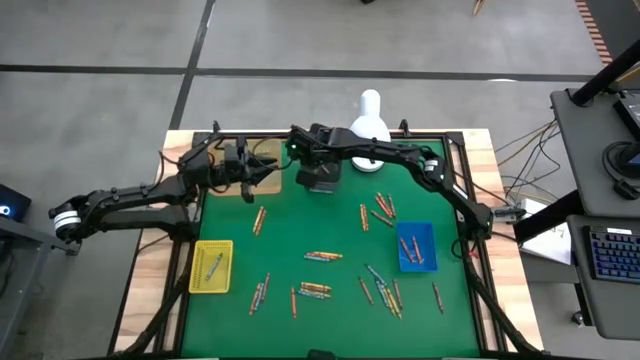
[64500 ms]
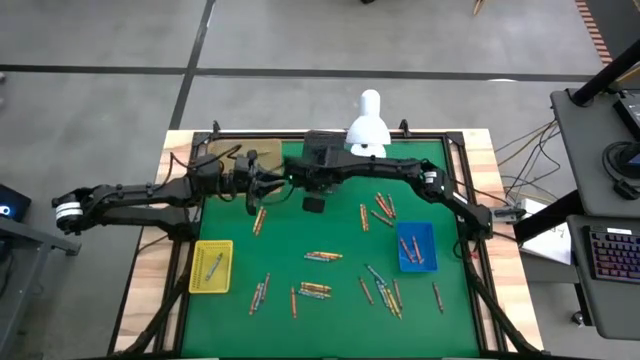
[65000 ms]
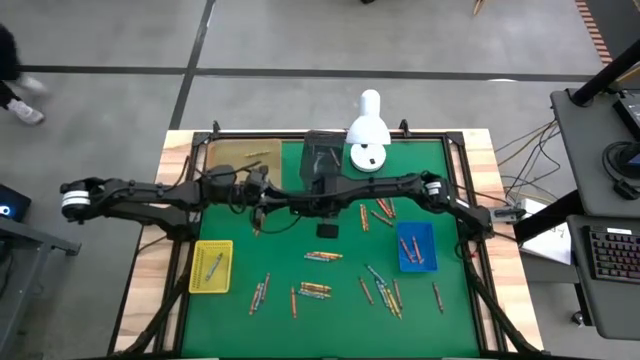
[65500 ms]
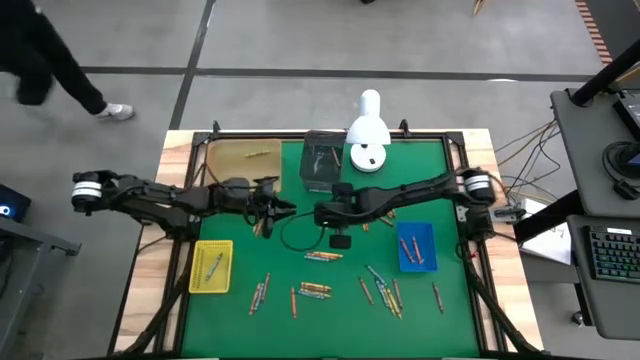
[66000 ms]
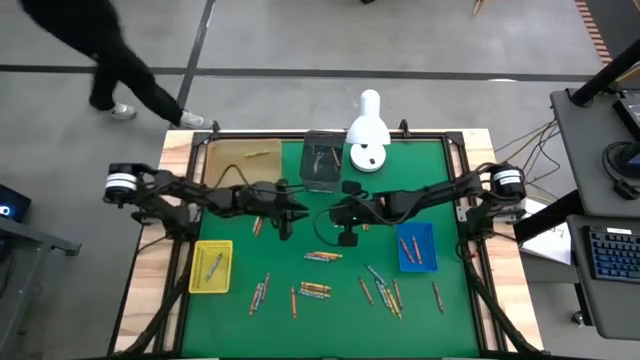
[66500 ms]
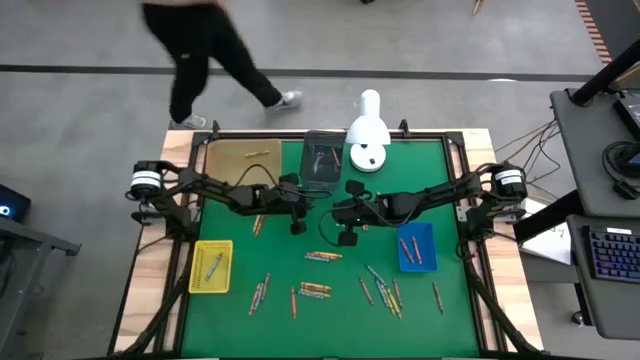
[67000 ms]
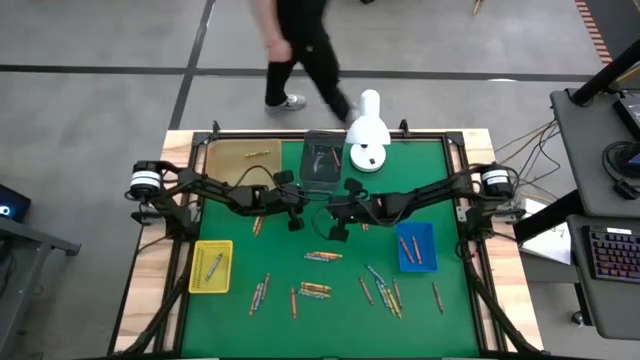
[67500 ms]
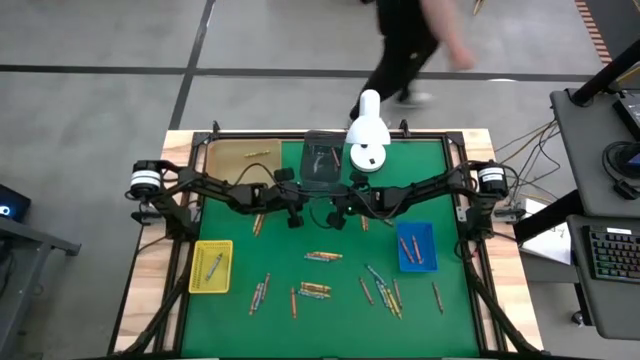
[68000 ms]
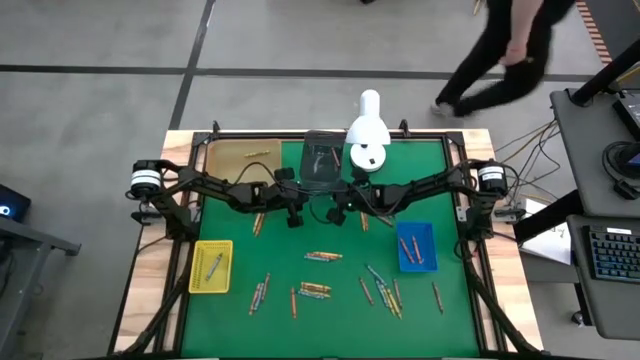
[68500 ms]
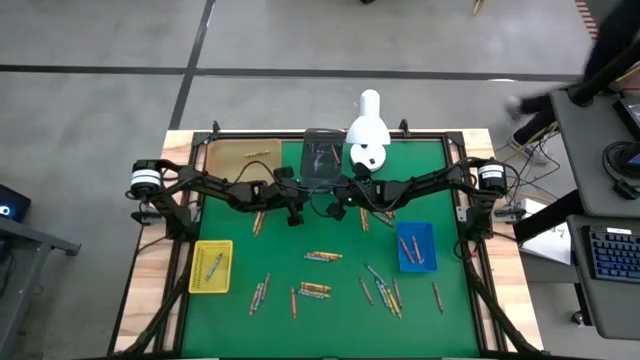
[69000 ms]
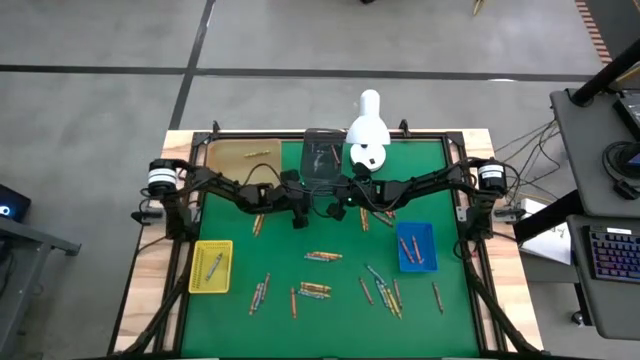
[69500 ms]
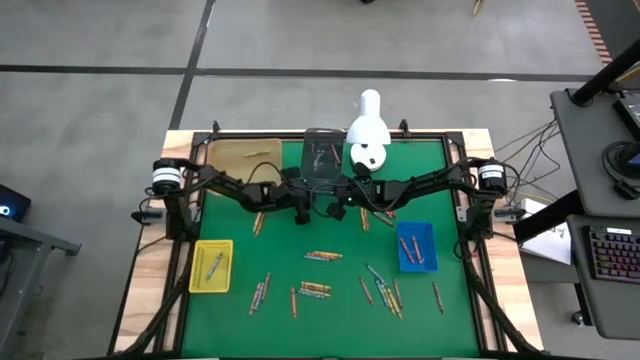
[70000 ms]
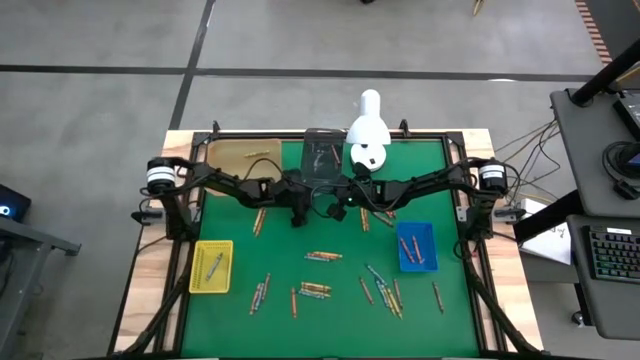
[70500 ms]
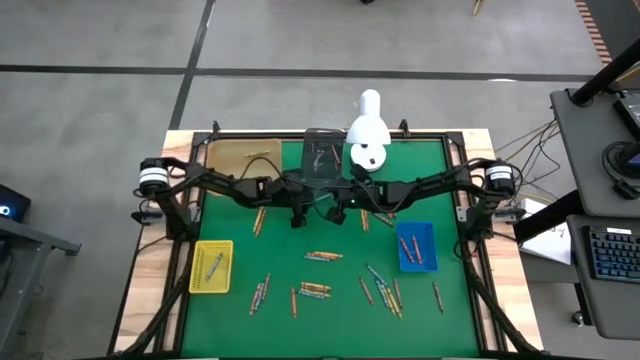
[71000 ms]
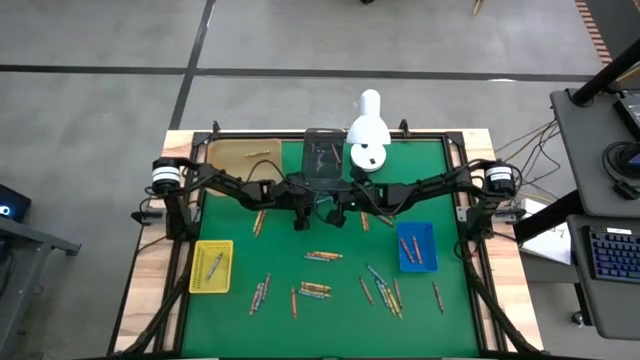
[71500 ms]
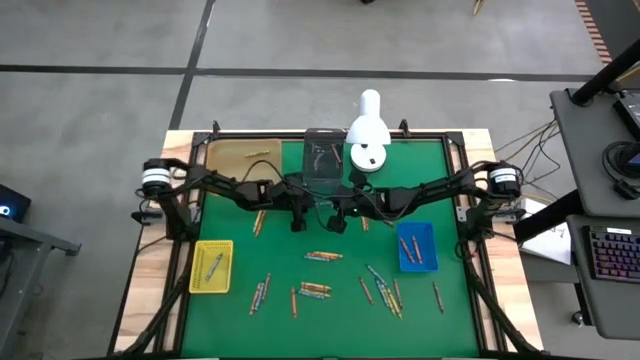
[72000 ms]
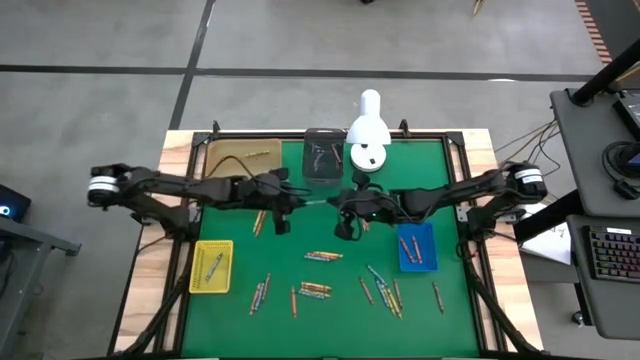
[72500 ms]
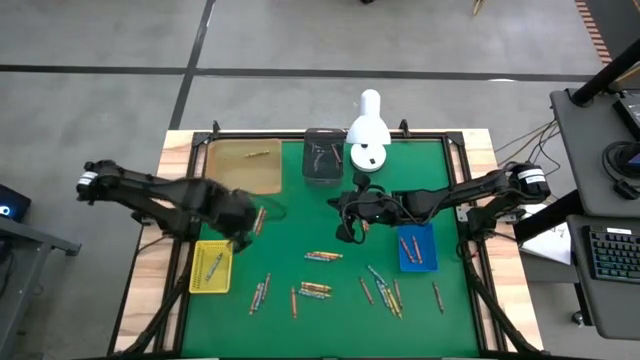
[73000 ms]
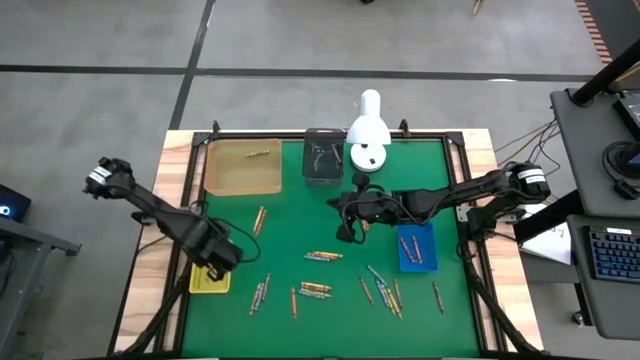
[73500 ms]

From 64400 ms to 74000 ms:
Task: Sort crayons
Put the blue crayon into the yellow bin

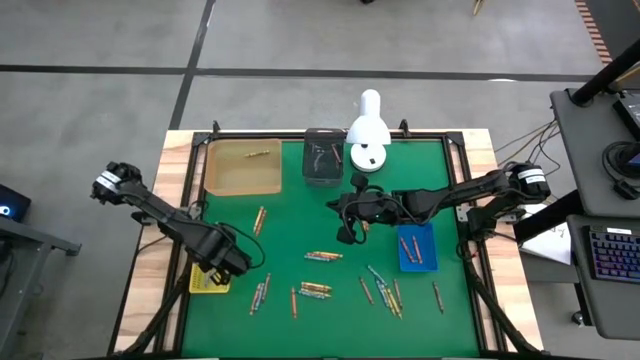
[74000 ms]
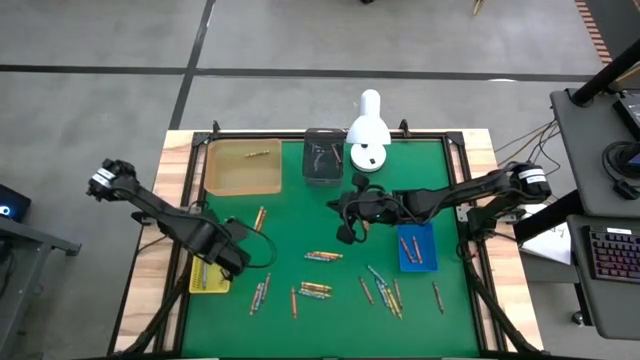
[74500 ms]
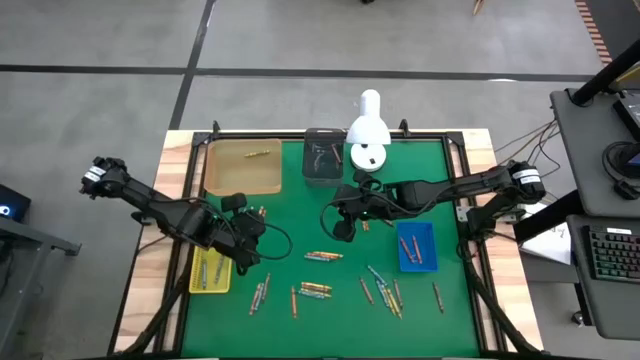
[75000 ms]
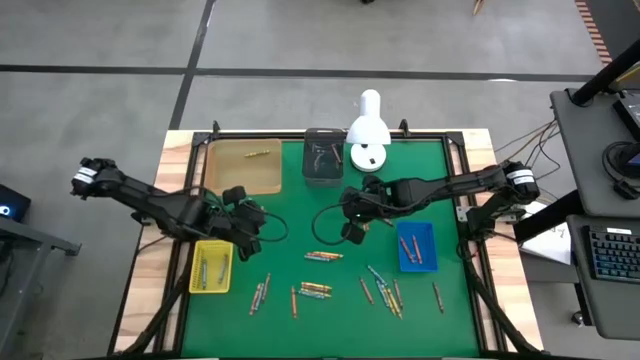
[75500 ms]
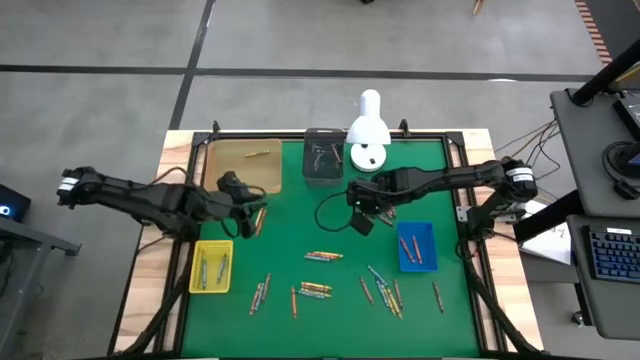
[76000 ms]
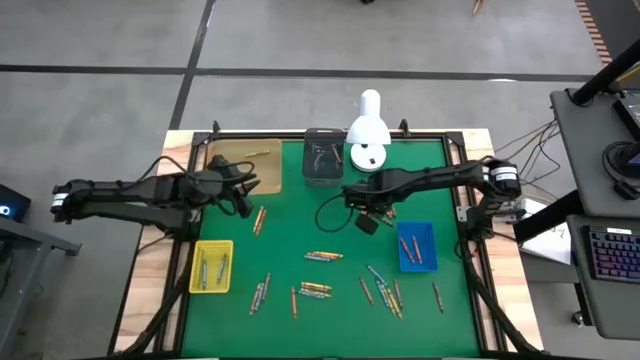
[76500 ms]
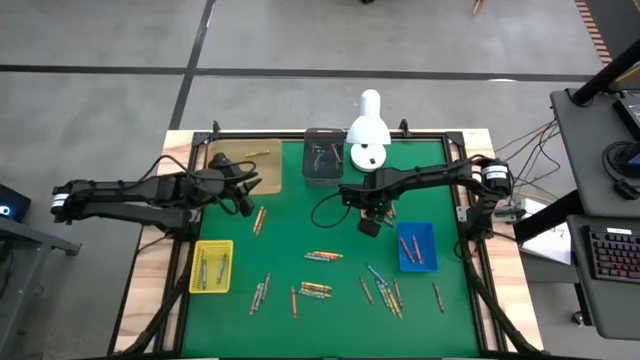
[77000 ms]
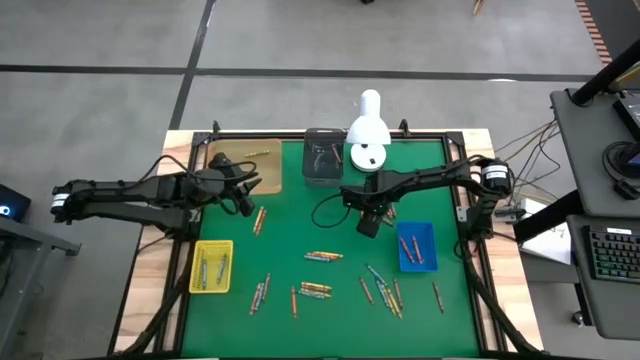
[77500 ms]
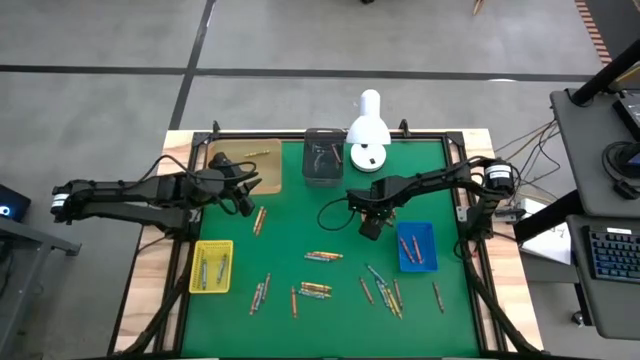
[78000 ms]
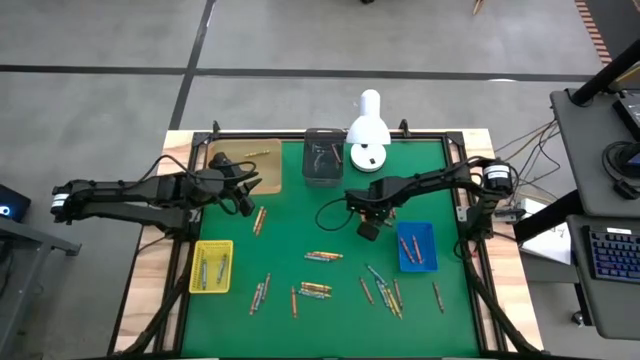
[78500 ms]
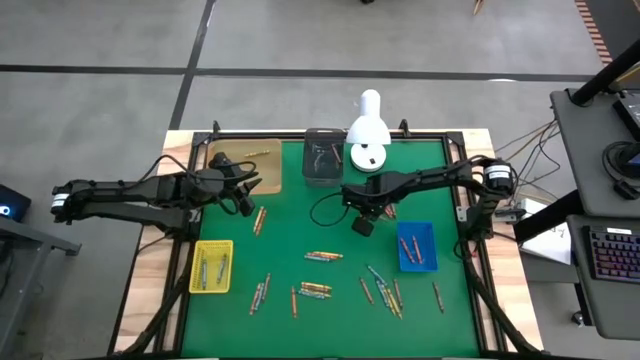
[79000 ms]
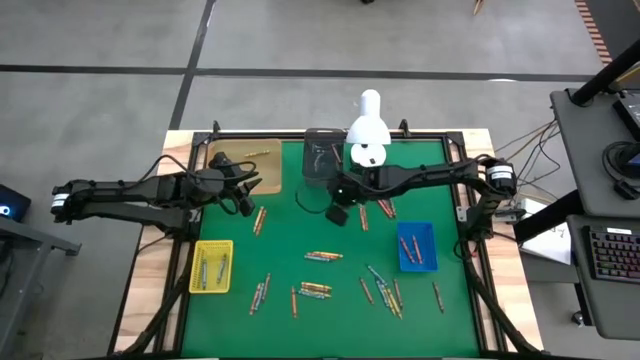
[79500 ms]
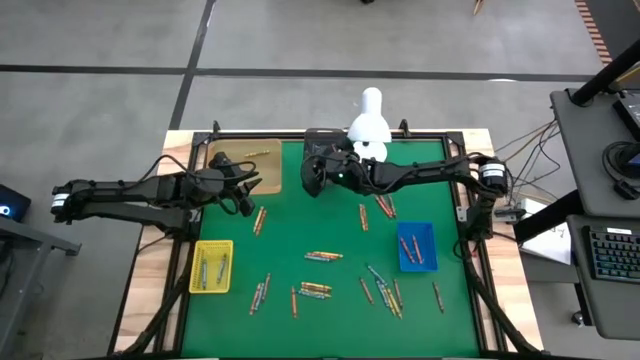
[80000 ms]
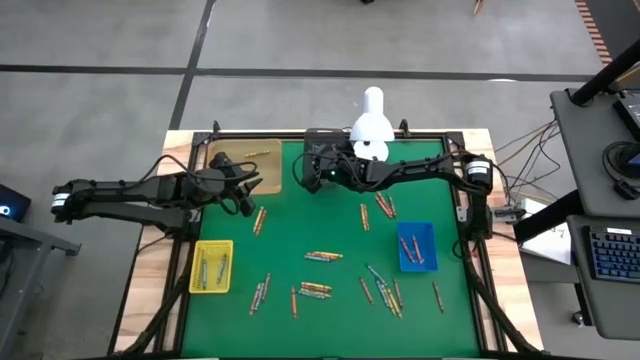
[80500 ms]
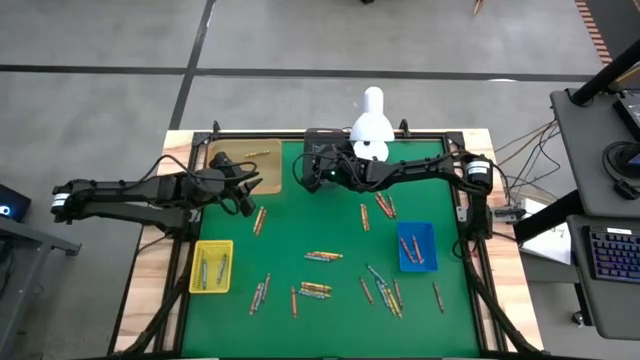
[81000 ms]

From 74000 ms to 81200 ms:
Put the brown crayon into the black bin

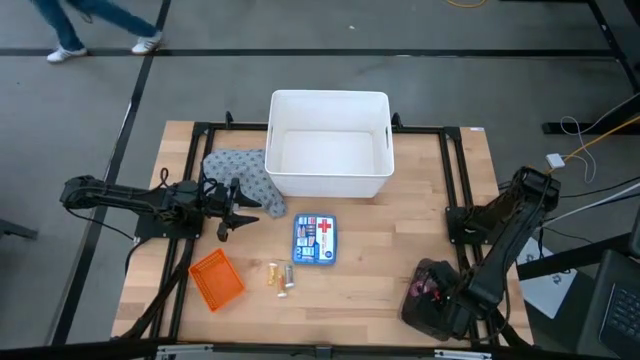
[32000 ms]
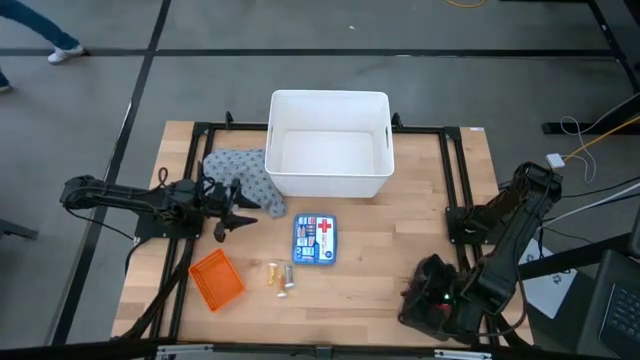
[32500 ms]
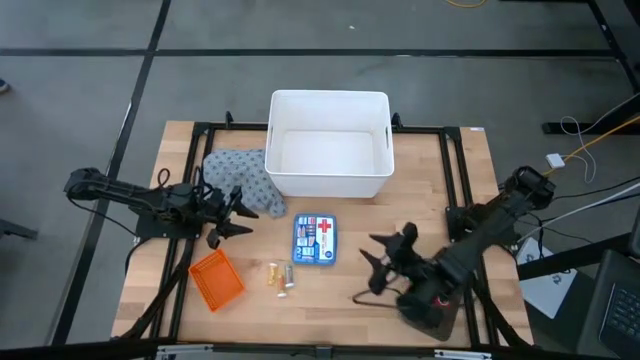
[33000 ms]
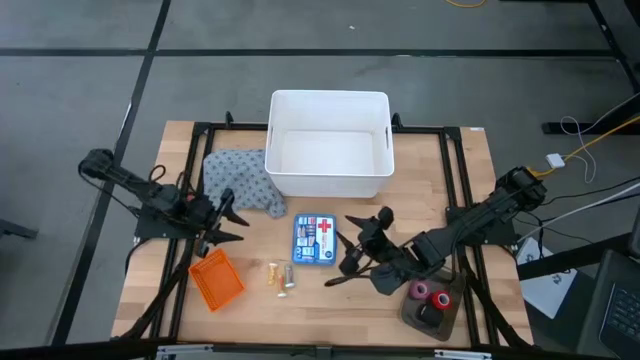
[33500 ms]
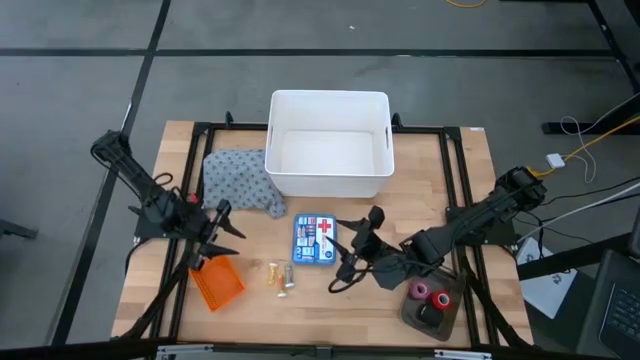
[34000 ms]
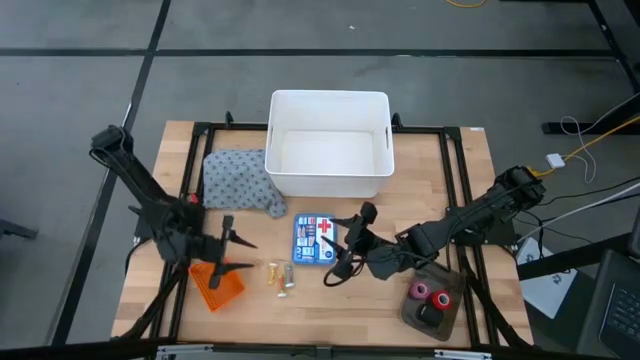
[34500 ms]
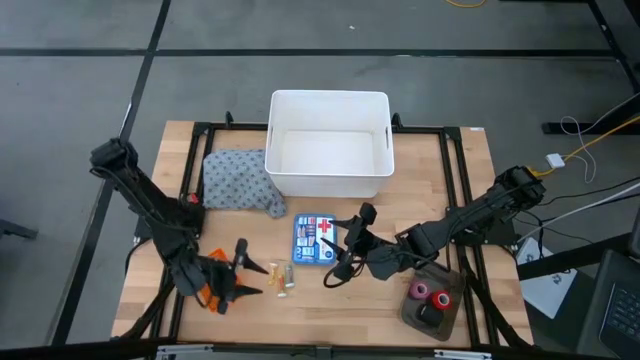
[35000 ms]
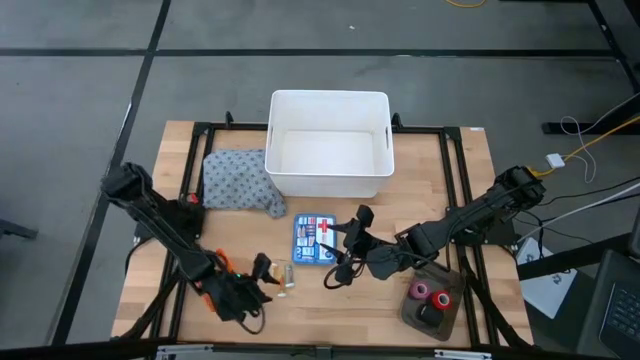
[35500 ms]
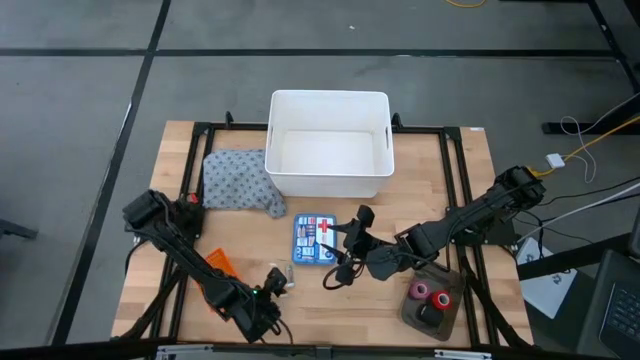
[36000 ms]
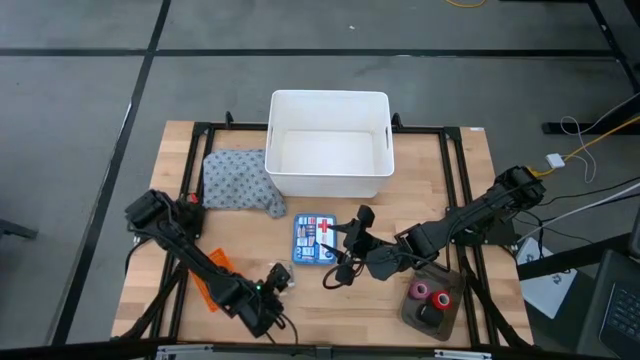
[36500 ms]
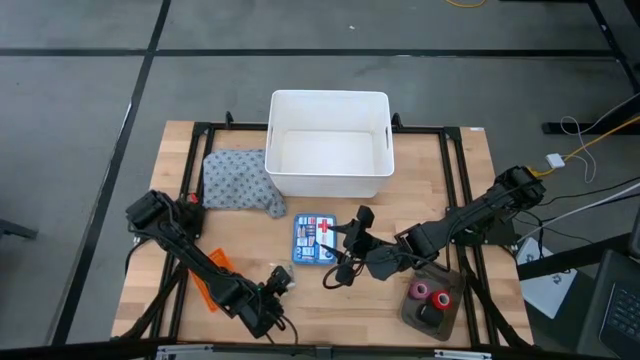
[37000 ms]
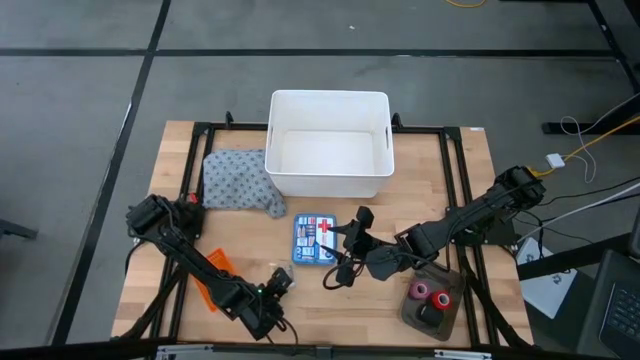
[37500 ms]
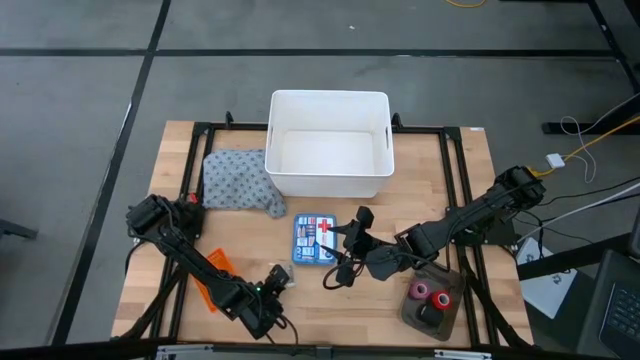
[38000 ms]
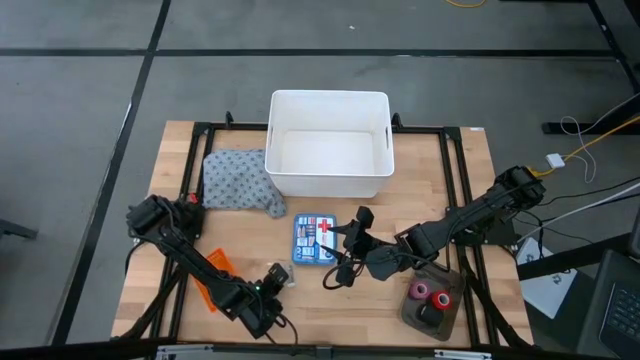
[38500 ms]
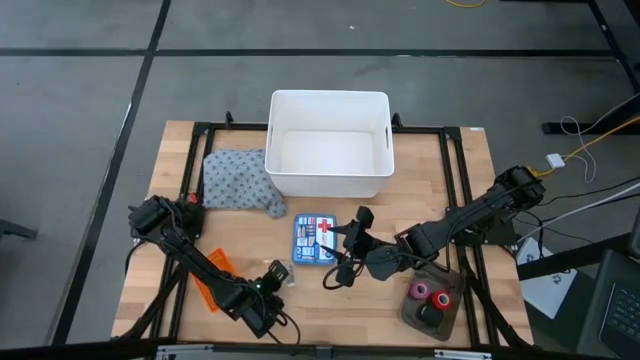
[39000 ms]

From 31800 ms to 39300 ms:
Task: Pick & place medical supplies in basket/bin
Put the bottom yellow pill bottle into the orange bin
